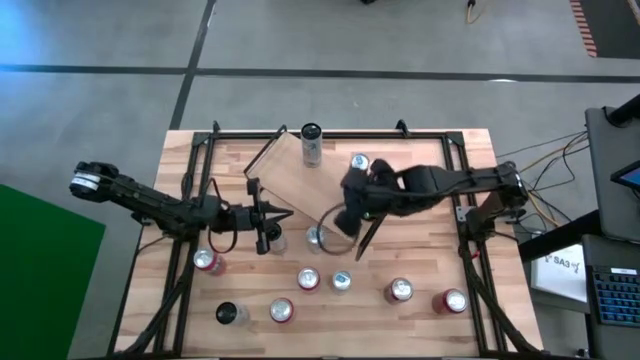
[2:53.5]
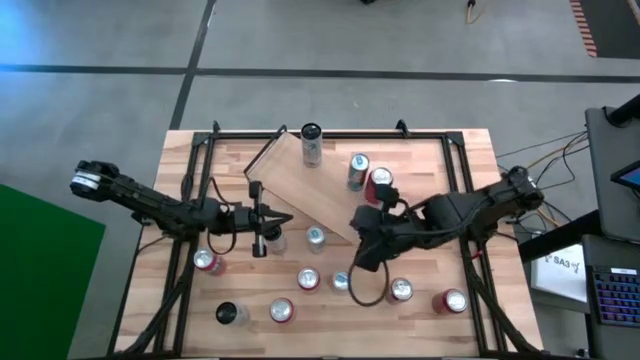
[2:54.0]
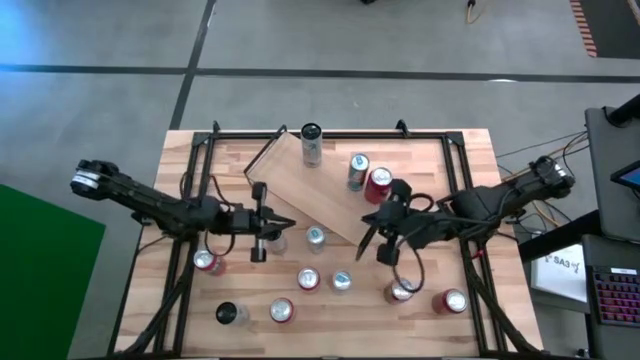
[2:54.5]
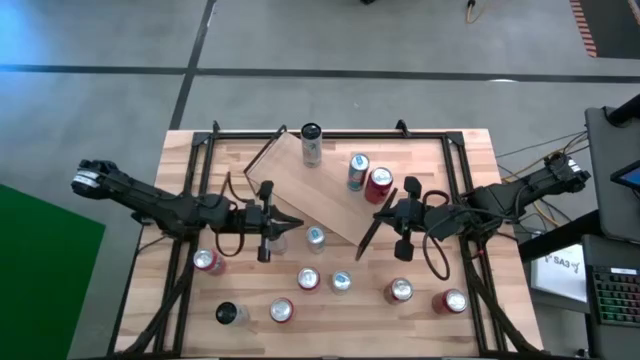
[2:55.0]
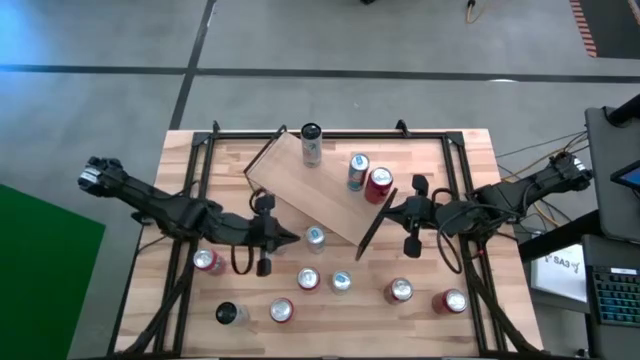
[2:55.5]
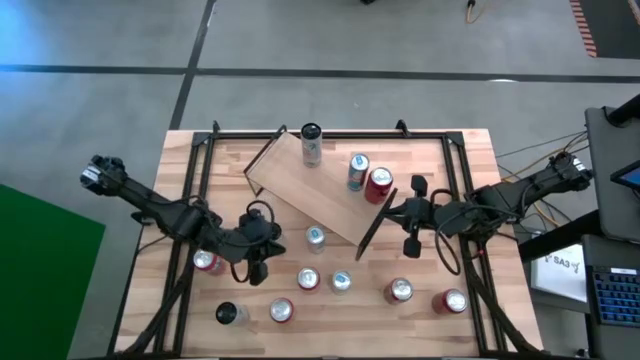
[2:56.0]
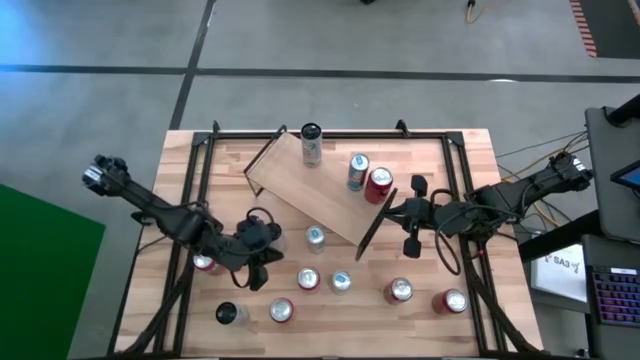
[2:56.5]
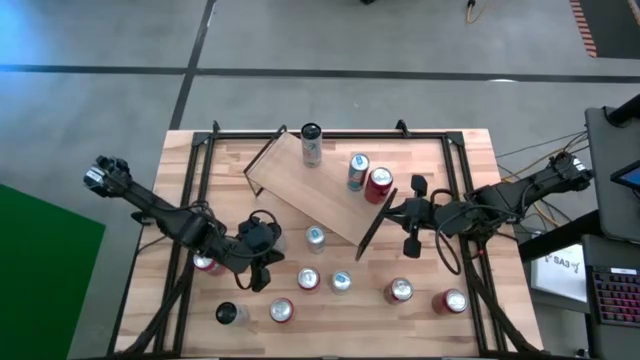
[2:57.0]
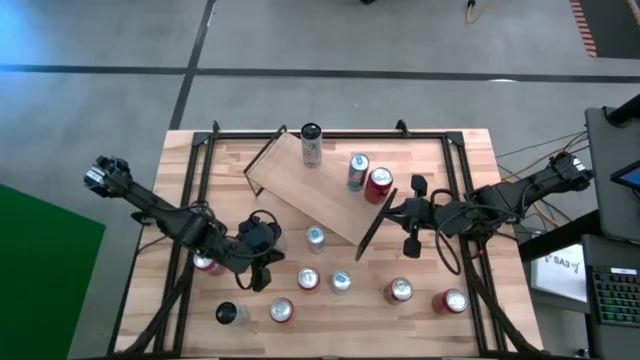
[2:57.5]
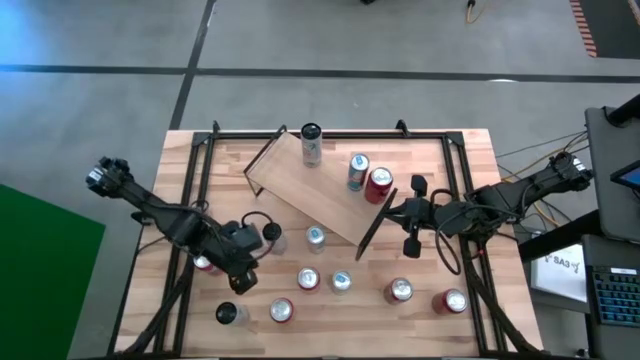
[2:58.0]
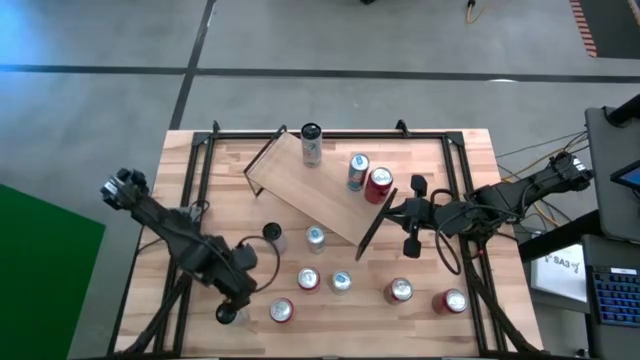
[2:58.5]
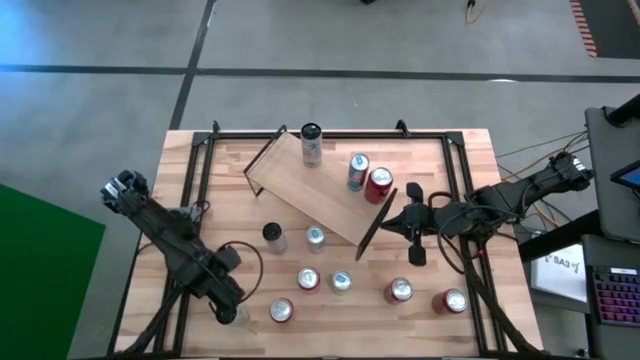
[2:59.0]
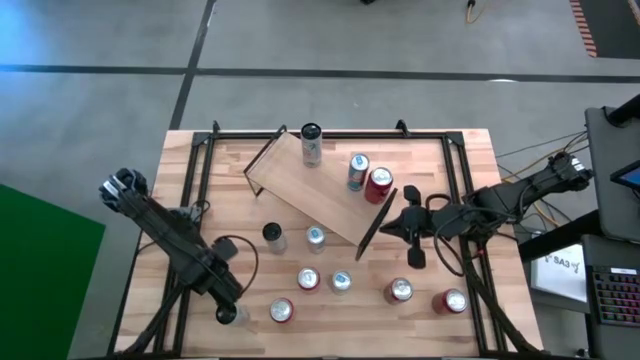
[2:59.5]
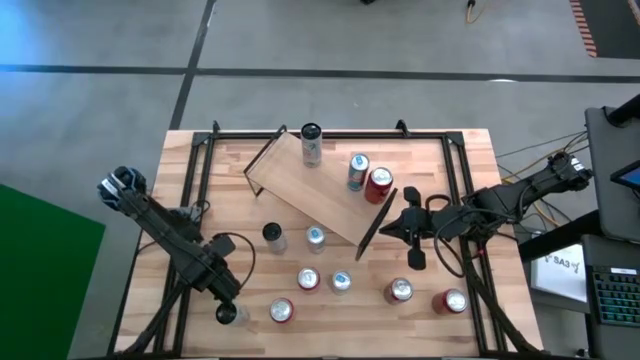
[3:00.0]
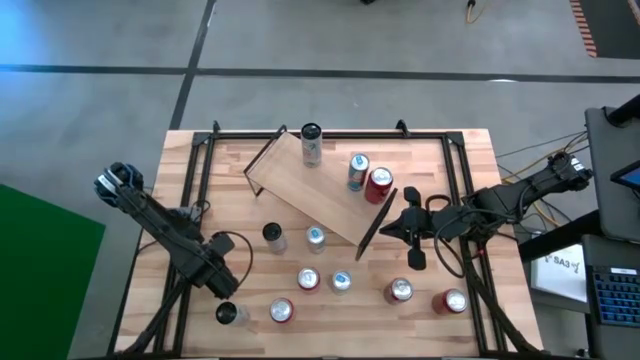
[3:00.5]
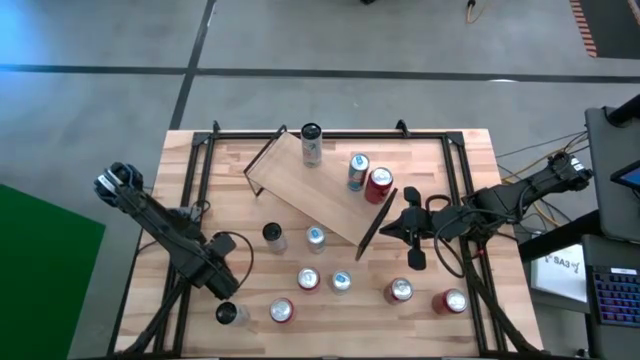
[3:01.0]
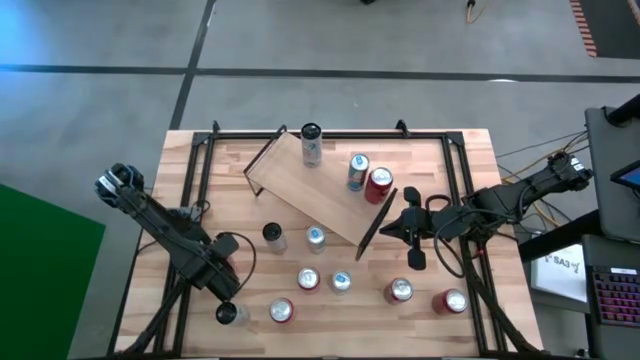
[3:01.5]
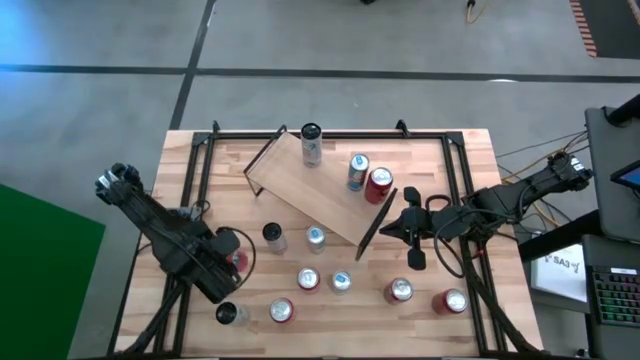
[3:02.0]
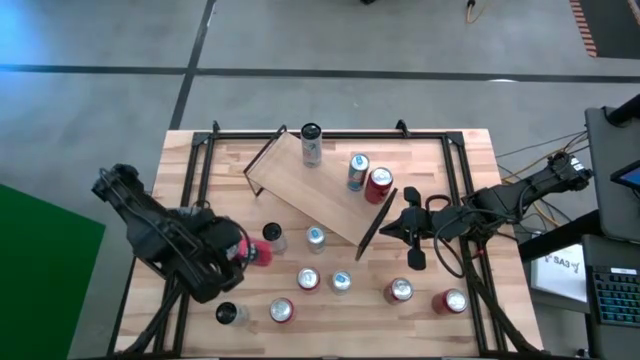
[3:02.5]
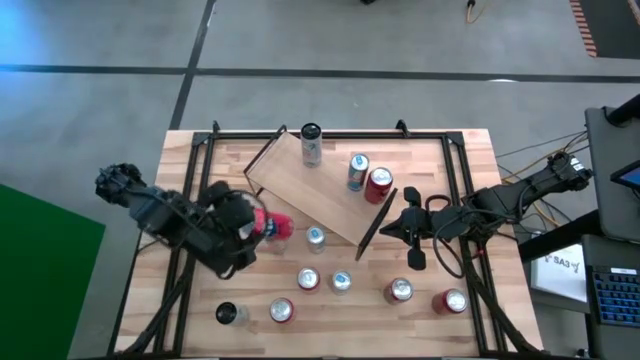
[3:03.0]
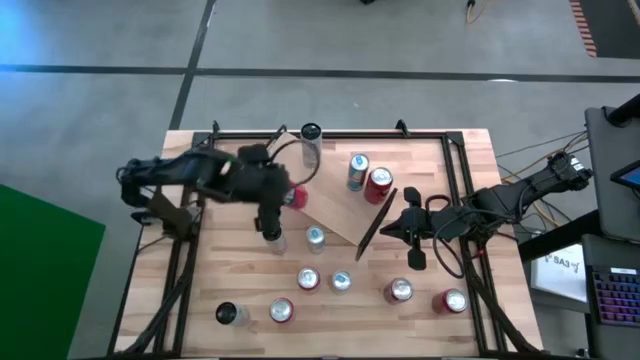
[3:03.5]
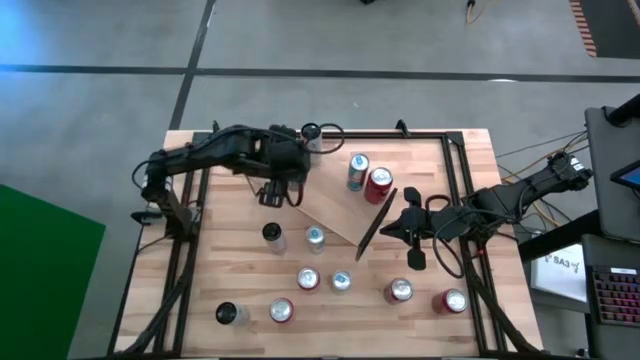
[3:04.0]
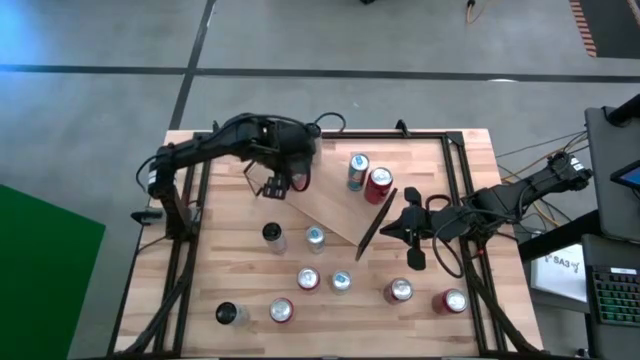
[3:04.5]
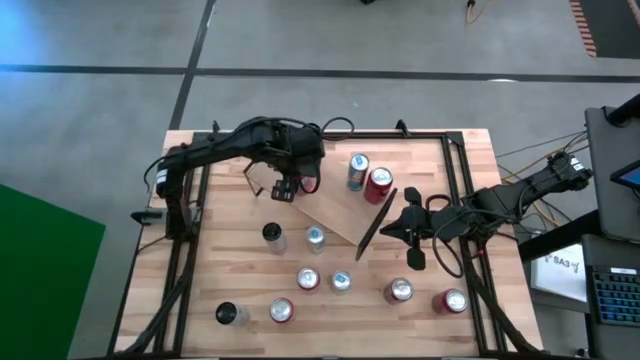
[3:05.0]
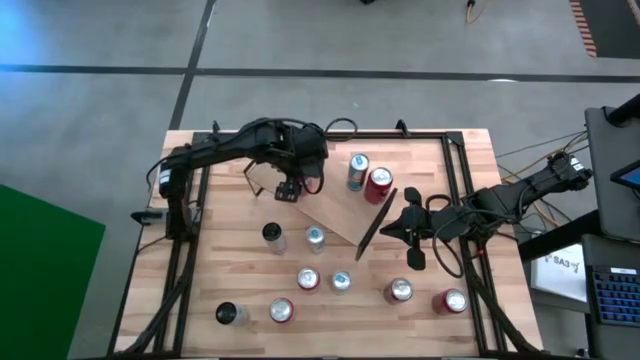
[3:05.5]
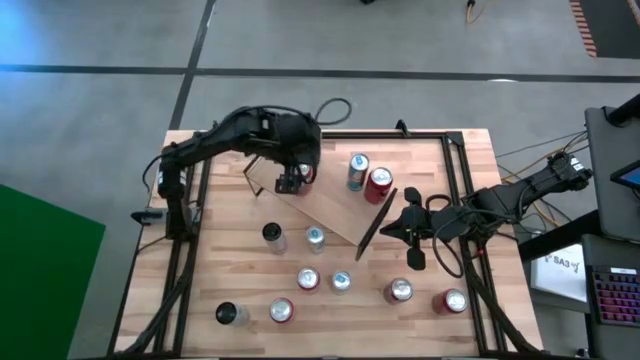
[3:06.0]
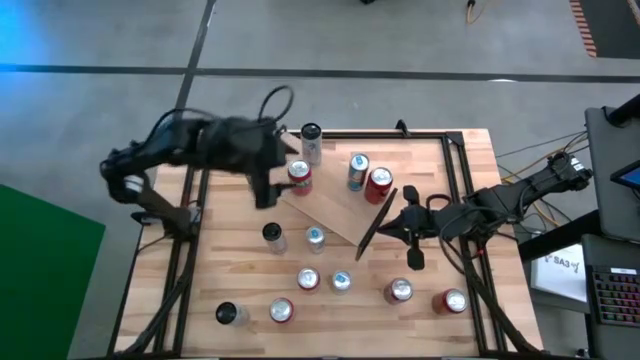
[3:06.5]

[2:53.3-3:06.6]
Task: Place canned beverage on shelf
Put the red soda can on the shelf

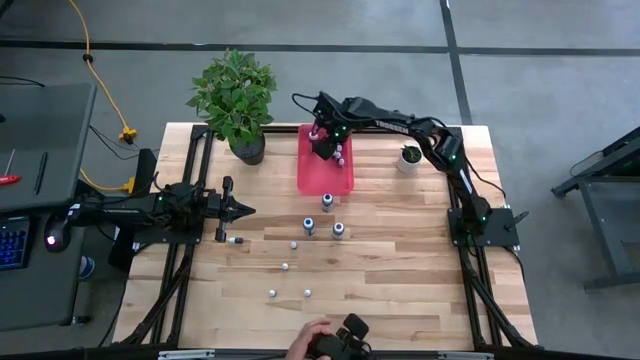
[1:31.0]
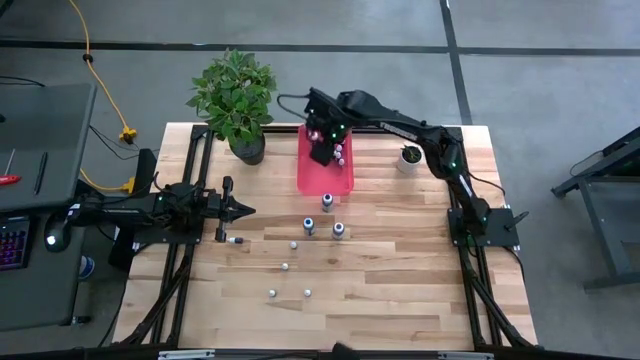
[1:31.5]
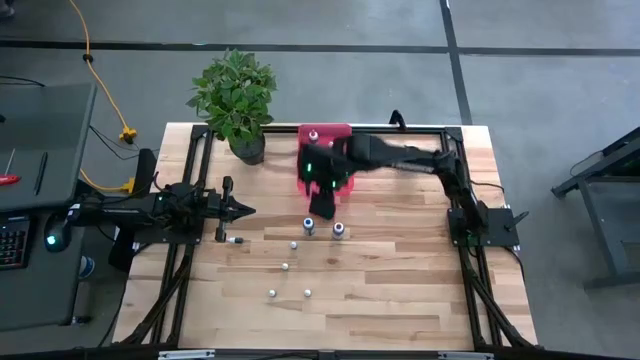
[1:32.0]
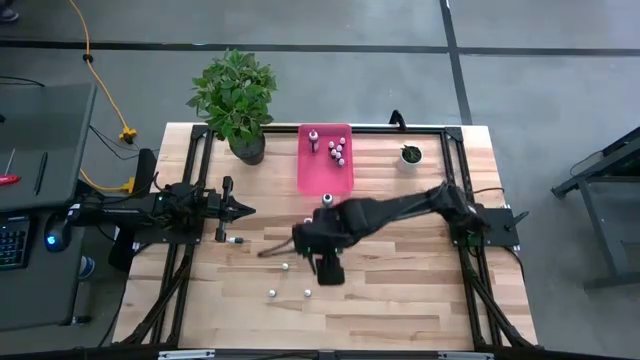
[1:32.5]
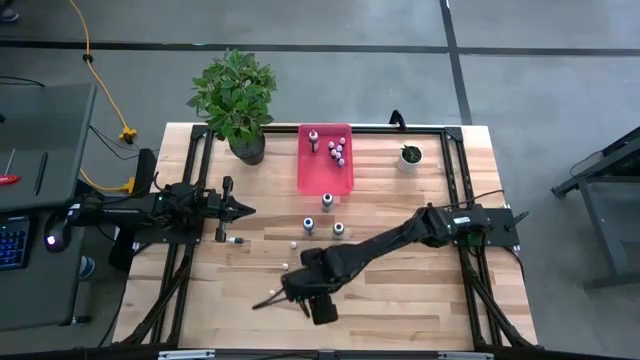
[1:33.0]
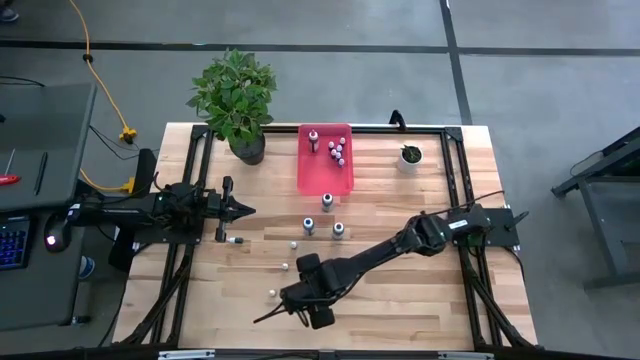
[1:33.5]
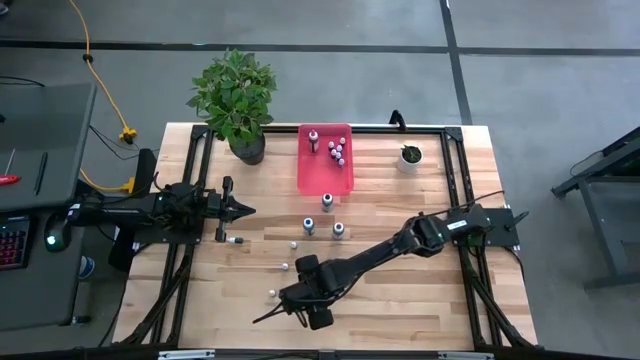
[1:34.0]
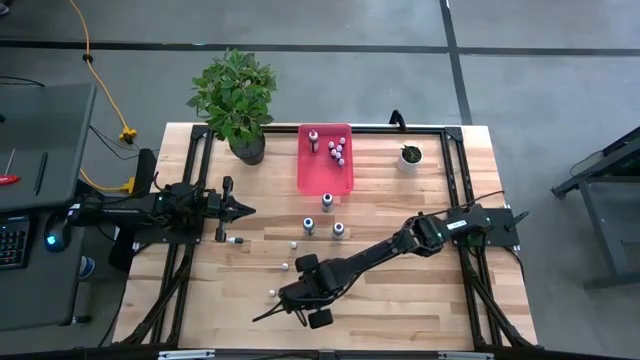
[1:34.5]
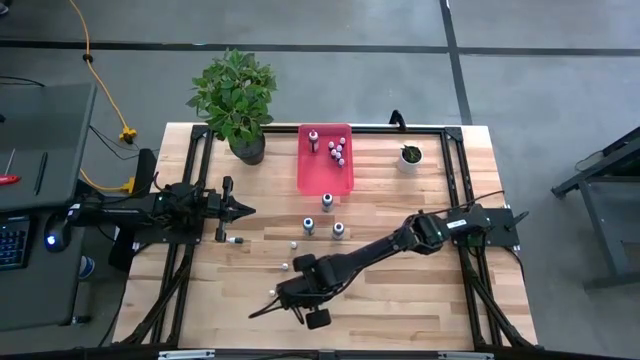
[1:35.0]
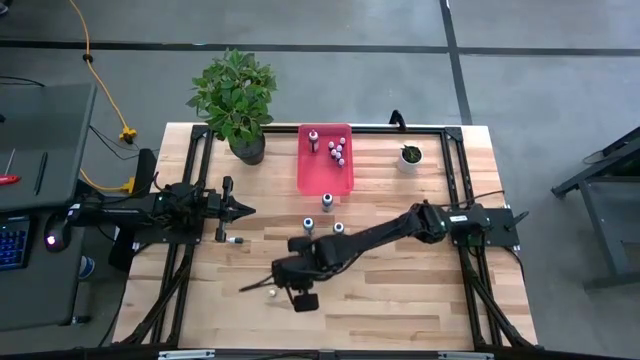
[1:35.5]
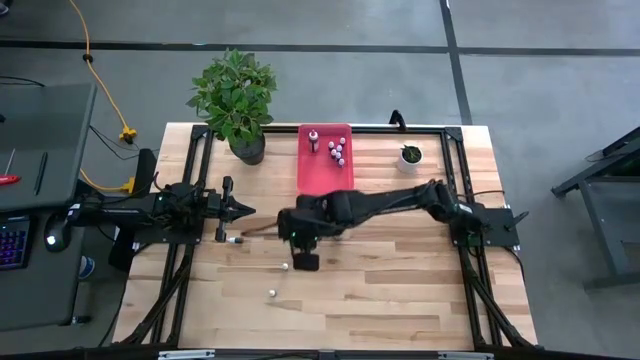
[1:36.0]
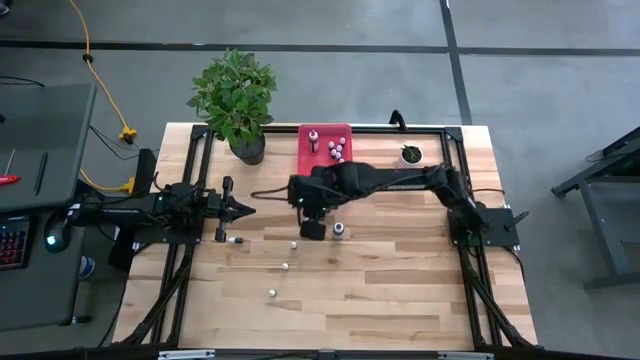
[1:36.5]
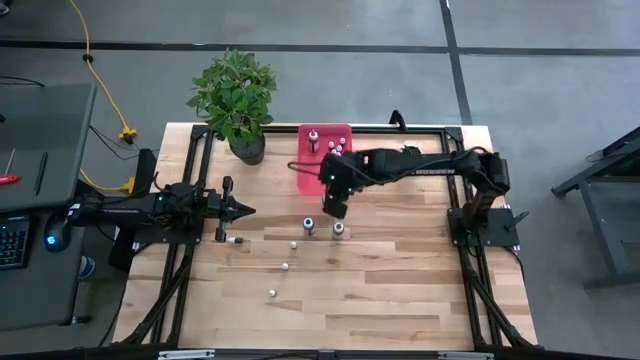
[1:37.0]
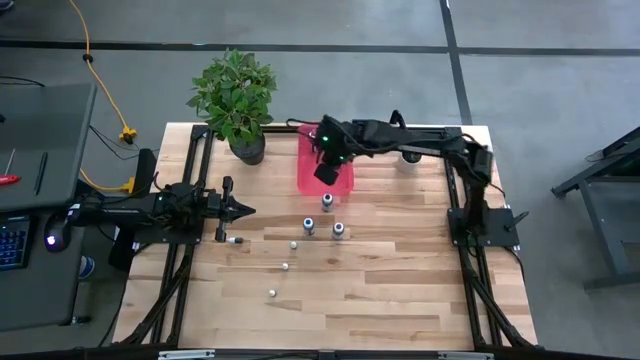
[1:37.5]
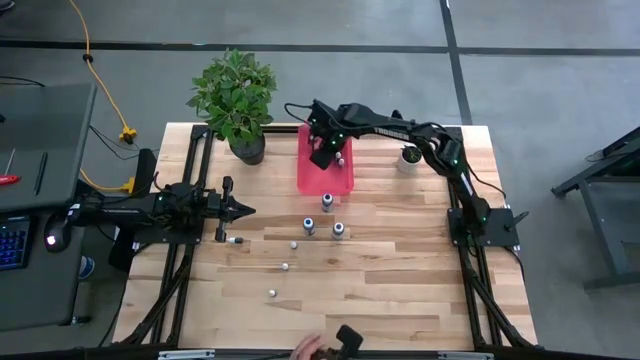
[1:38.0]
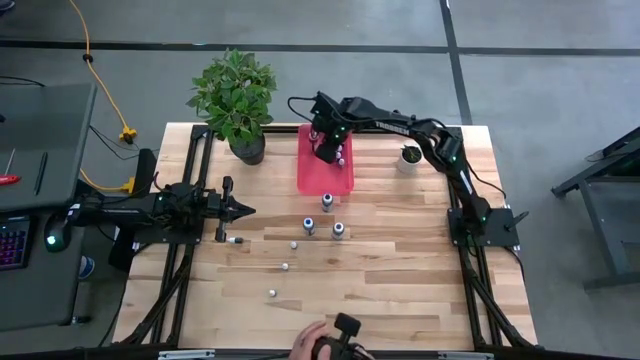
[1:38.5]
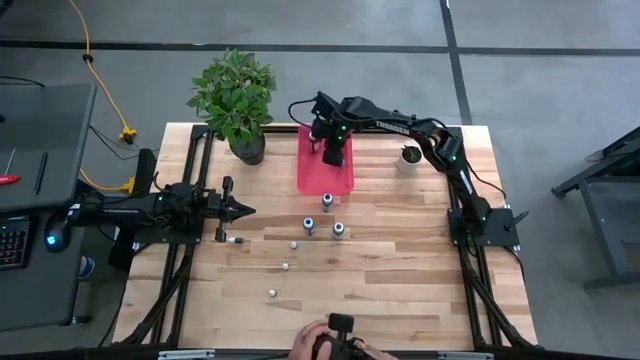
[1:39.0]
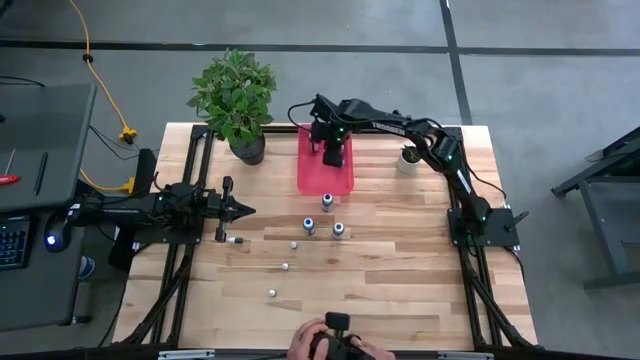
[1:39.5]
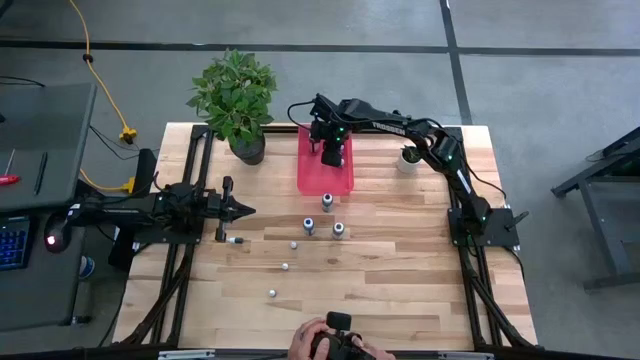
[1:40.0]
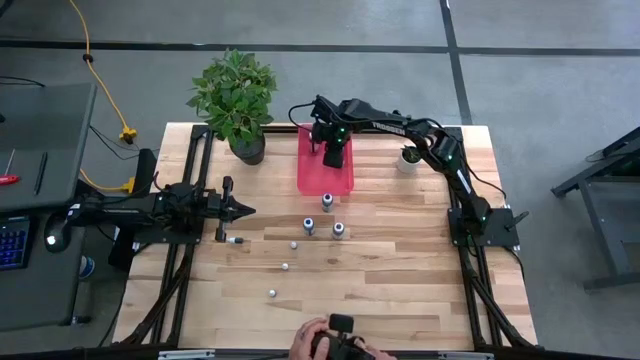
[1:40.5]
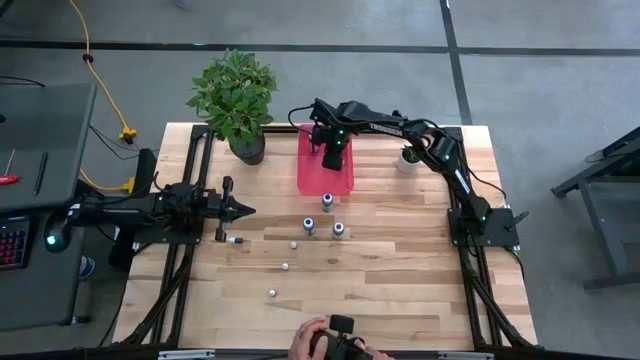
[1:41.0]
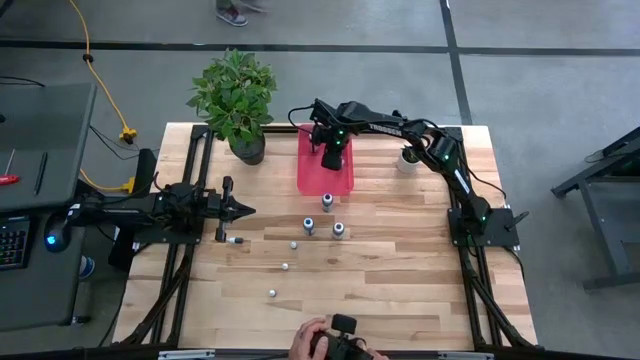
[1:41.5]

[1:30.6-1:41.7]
Task: Pick & Place food coloring
Put the orange food coloring bottle into the pink bin
